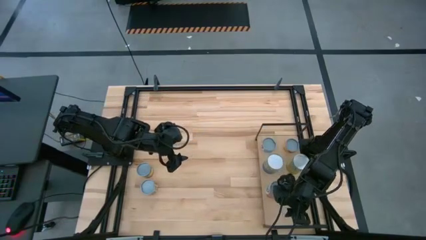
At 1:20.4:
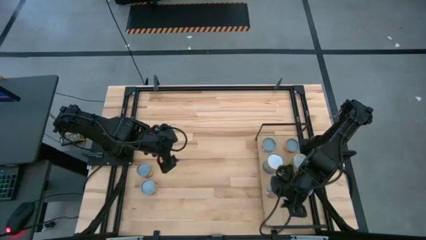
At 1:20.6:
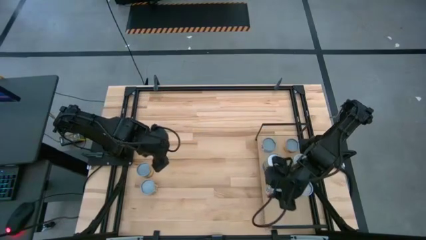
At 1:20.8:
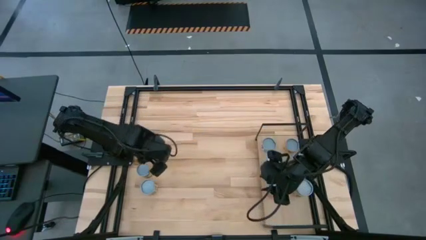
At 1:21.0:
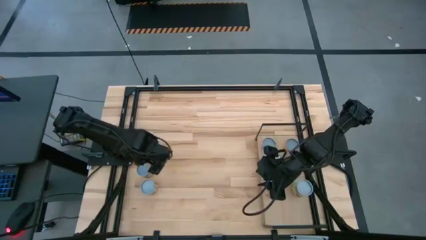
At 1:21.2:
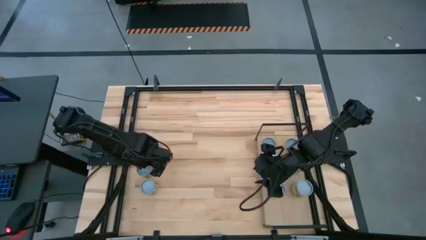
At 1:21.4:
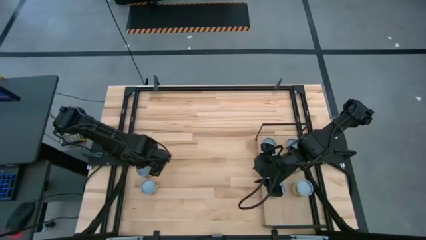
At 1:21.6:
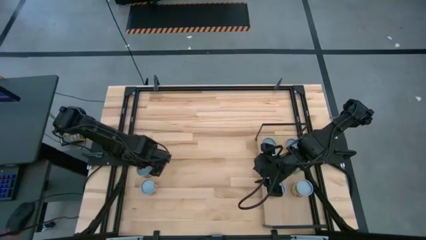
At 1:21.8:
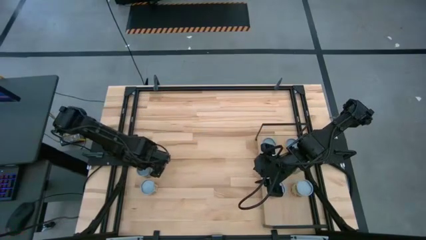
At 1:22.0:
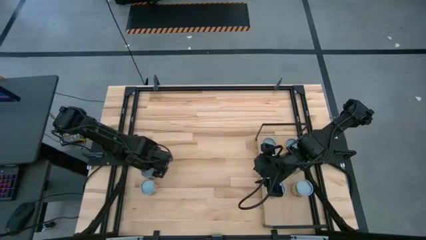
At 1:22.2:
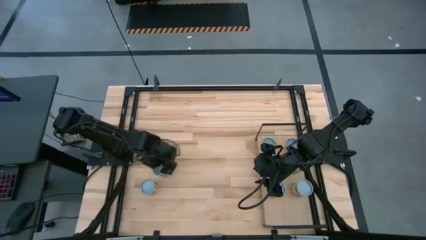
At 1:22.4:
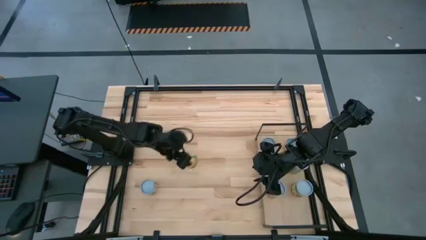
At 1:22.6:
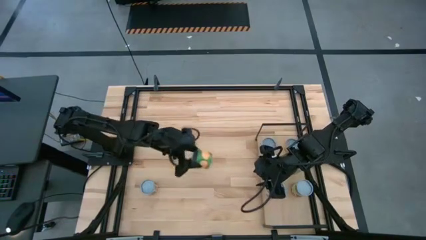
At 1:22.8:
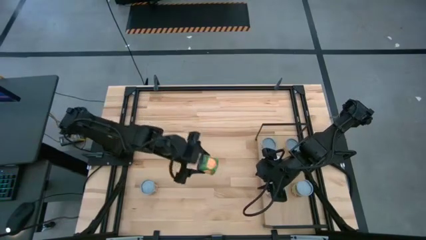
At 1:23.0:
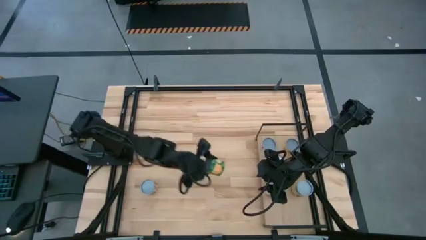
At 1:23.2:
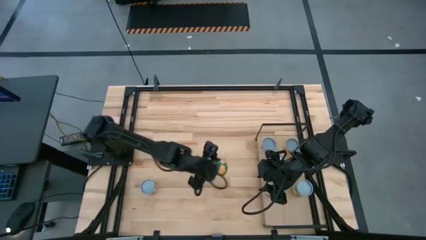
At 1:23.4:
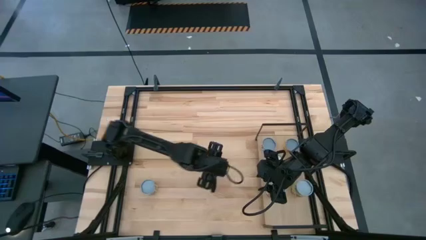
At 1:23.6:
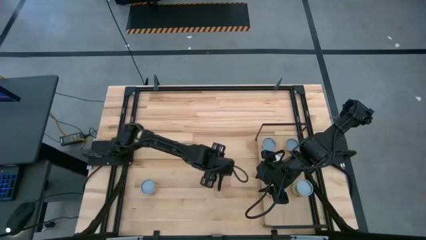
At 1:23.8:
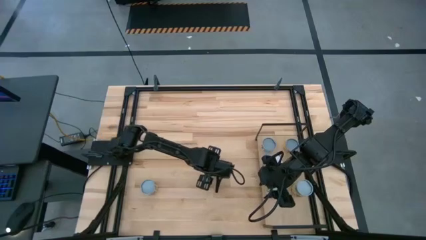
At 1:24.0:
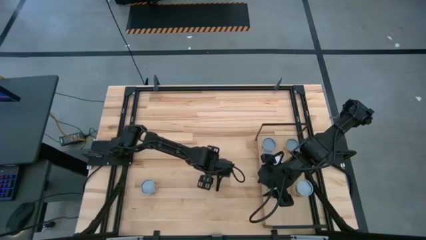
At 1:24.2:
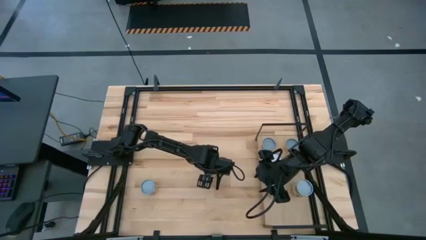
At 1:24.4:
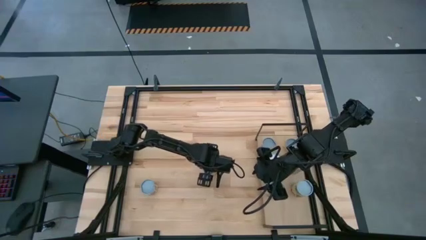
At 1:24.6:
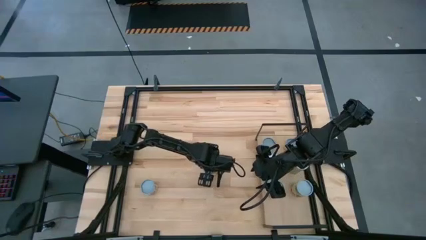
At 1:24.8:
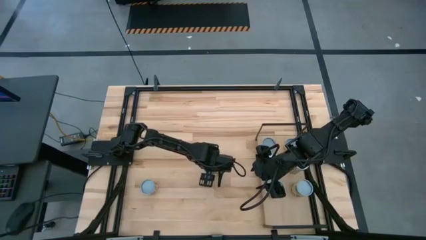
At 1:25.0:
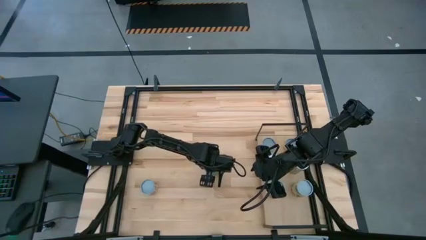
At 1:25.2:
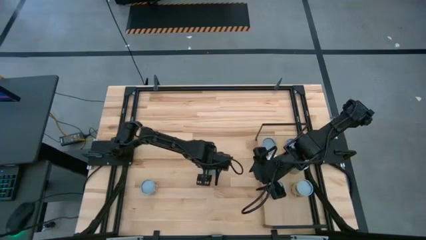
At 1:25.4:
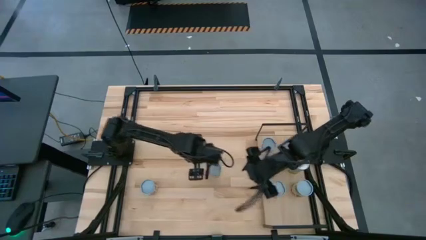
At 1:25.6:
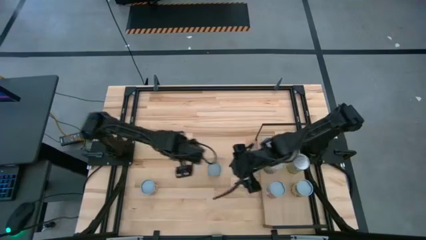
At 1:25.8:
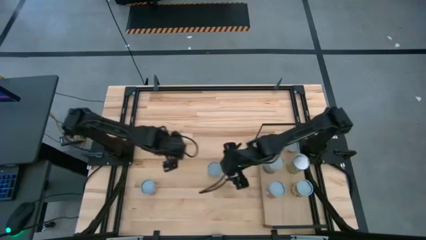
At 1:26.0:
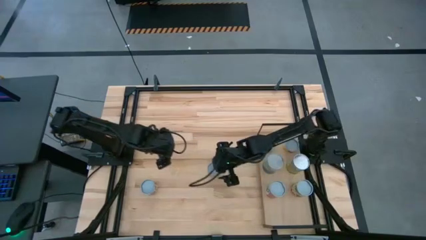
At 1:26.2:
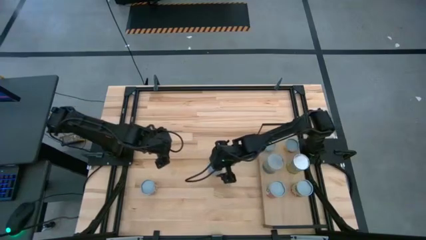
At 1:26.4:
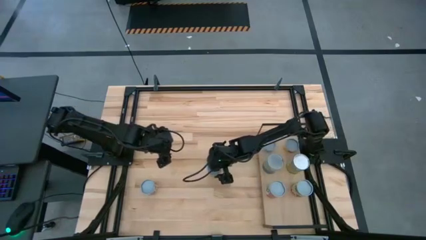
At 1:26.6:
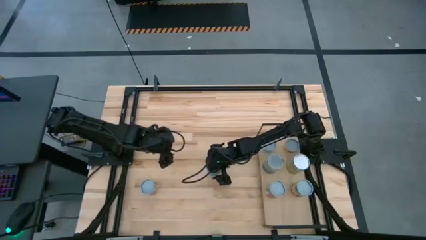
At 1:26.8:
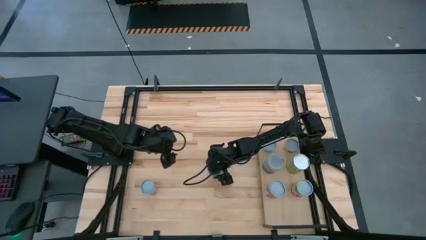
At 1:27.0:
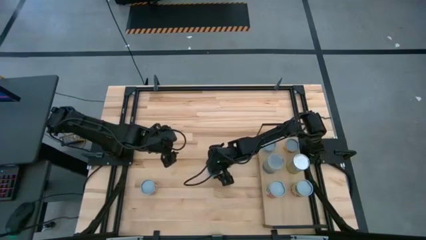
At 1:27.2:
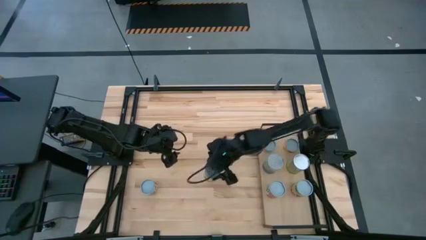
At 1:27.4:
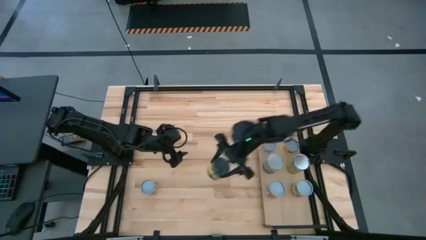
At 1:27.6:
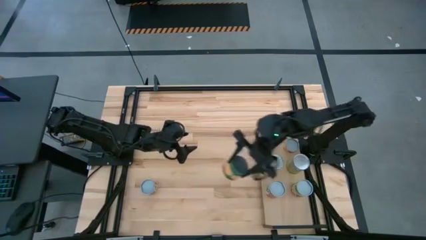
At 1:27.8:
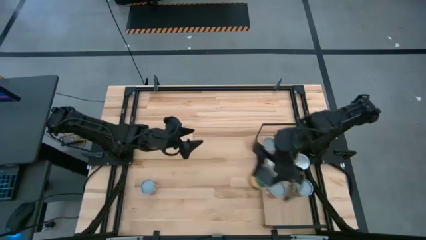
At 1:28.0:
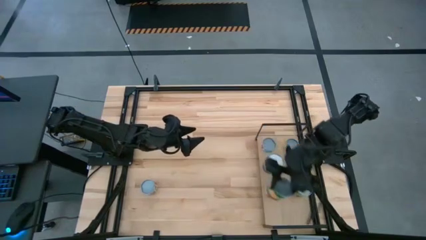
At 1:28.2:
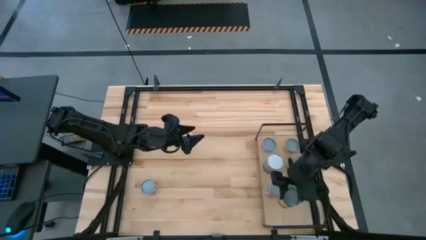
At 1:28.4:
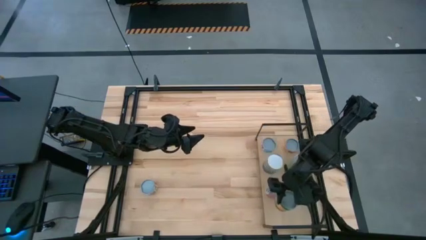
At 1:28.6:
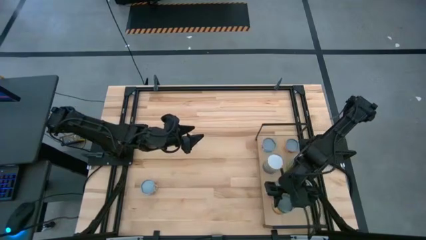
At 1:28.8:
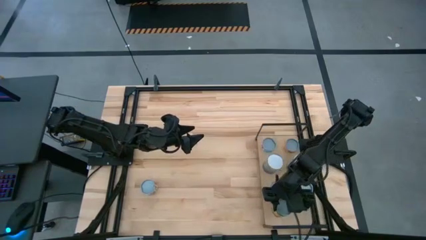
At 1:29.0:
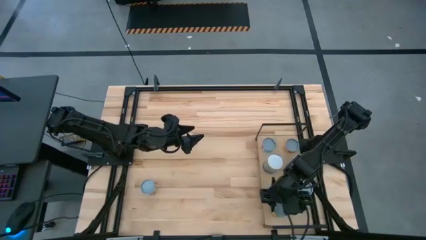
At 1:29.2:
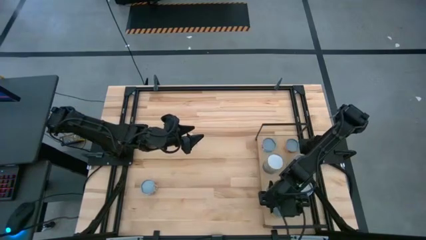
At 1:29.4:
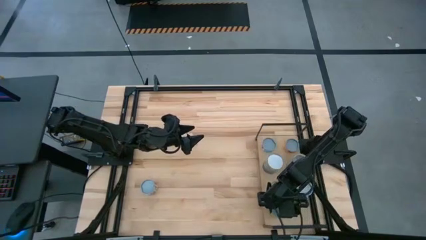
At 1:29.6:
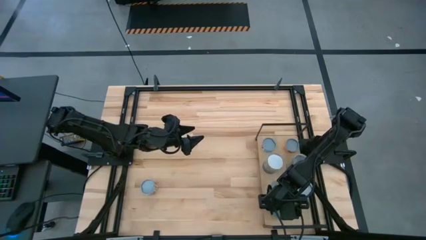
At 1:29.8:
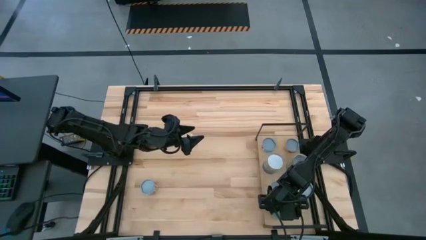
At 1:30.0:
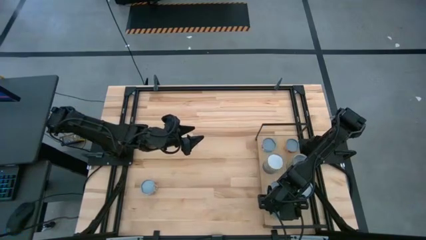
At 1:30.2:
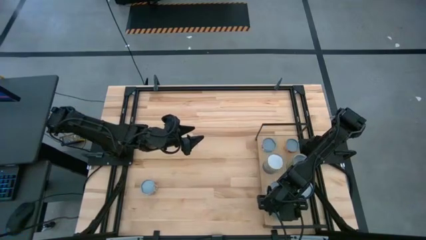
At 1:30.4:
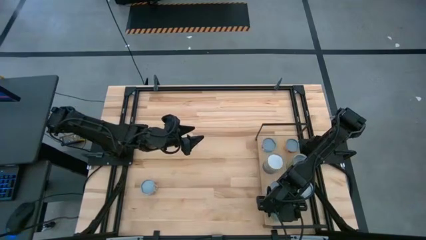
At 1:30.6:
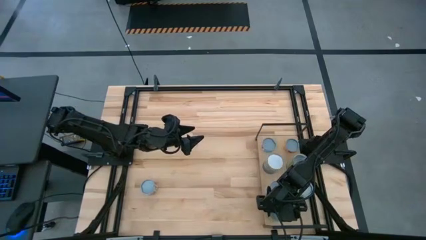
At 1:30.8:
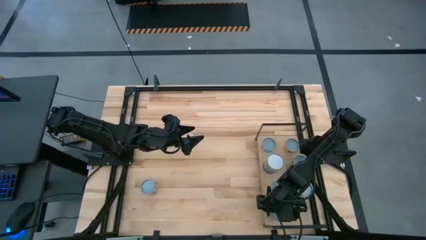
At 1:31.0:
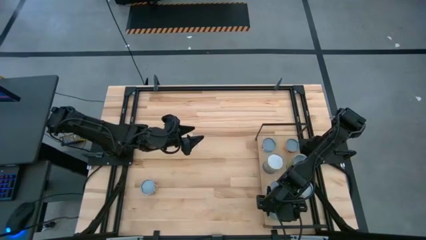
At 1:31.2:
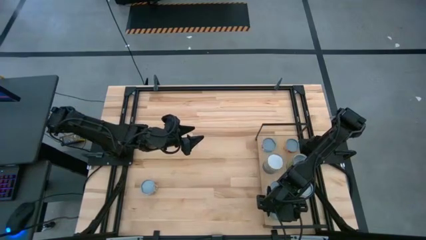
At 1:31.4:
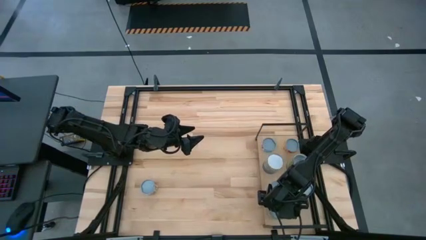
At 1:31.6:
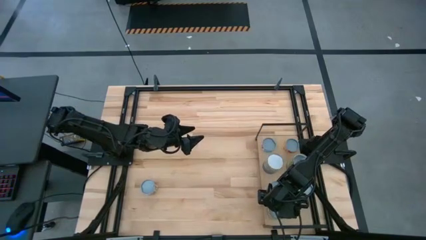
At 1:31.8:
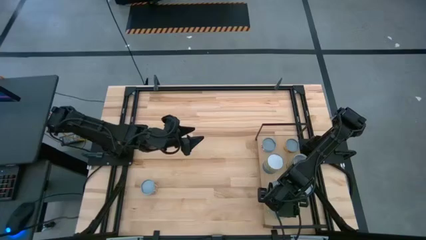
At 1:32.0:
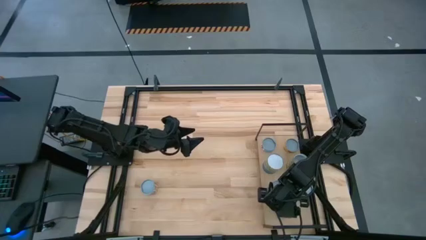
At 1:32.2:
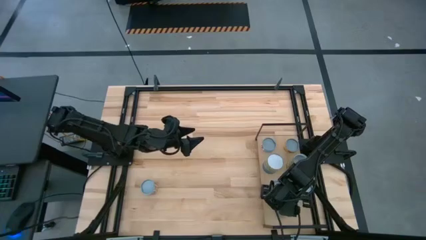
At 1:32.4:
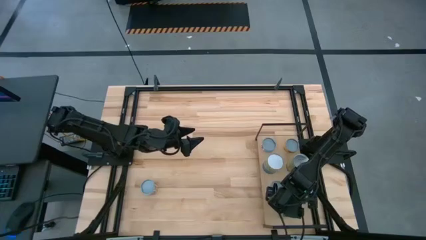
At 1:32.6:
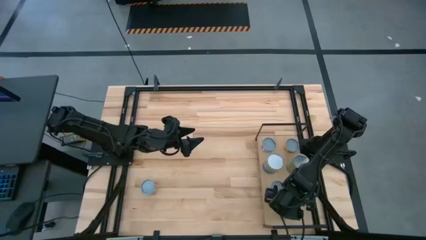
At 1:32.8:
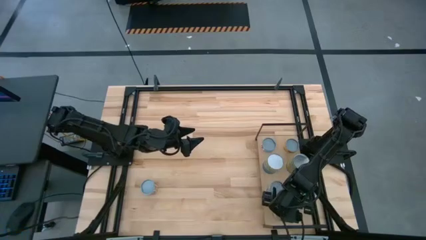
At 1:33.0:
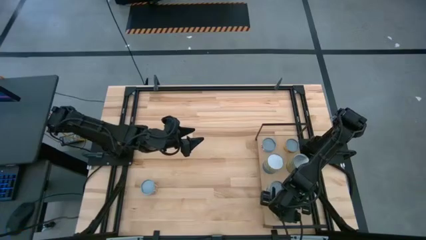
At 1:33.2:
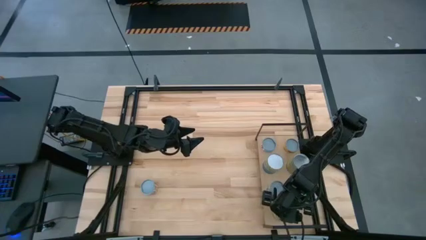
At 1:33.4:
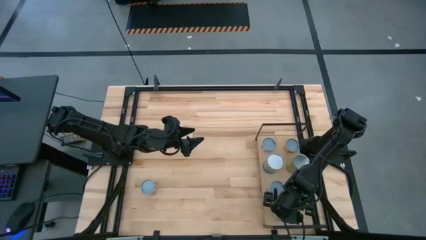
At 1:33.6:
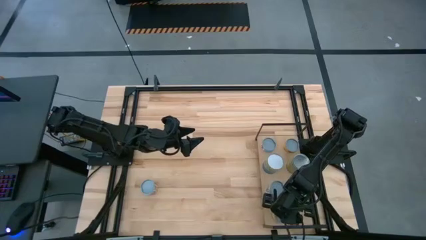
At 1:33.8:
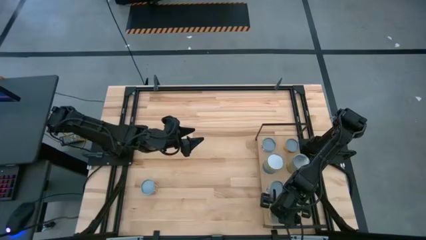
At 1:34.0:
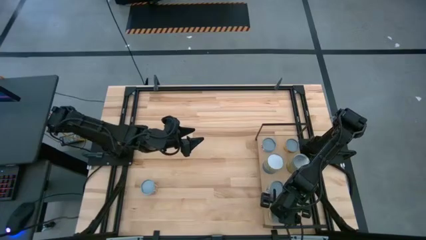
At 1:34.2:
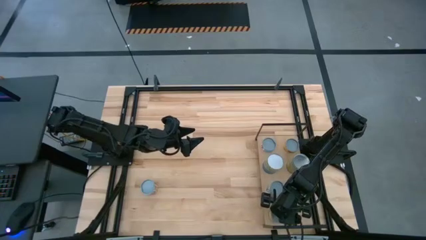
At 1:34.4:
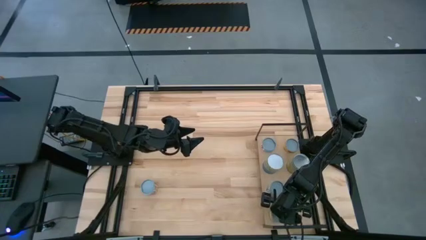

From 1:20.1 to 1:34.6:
Task: Pick and place cans onto a shelf
Put the canned peaches on the shelf

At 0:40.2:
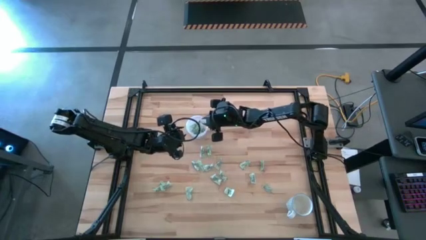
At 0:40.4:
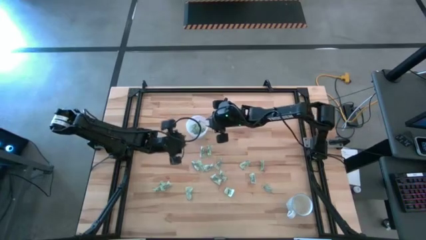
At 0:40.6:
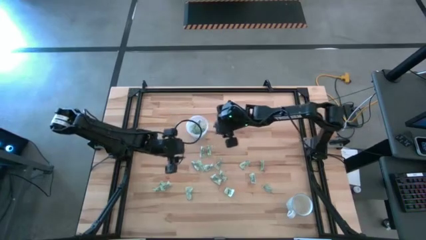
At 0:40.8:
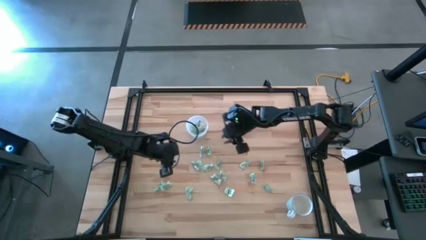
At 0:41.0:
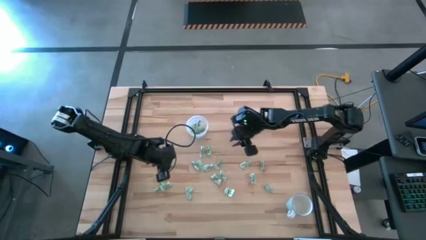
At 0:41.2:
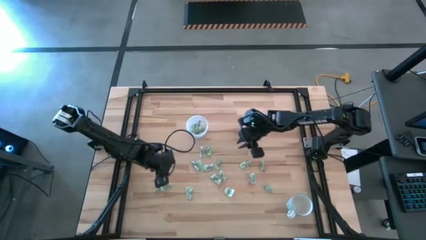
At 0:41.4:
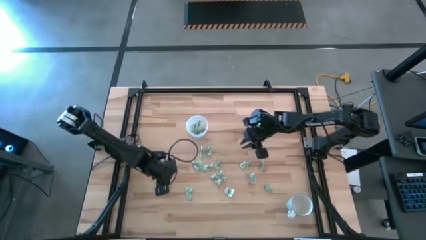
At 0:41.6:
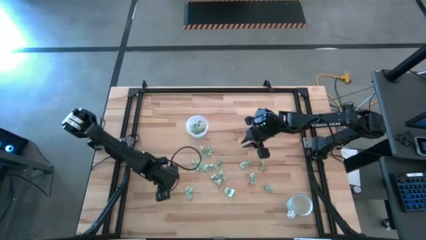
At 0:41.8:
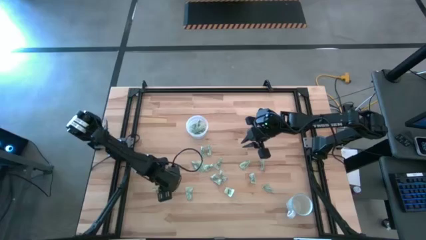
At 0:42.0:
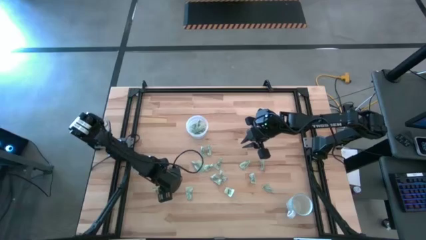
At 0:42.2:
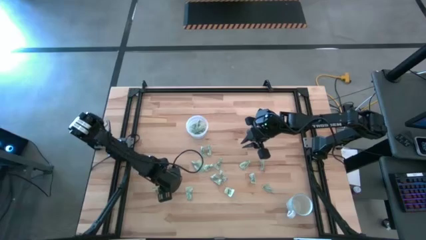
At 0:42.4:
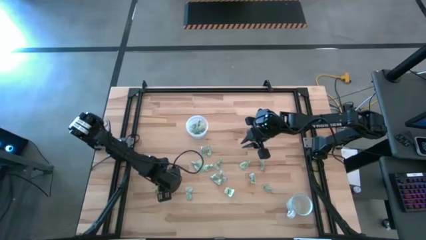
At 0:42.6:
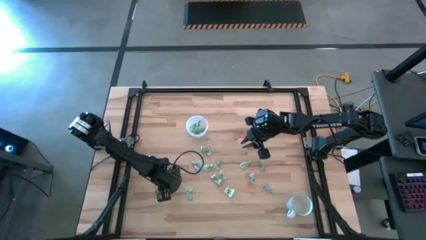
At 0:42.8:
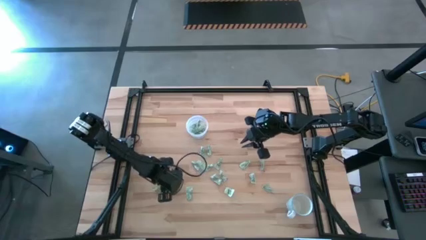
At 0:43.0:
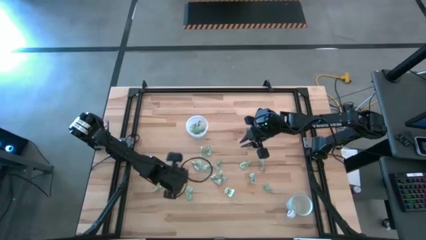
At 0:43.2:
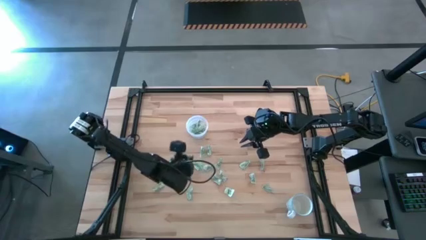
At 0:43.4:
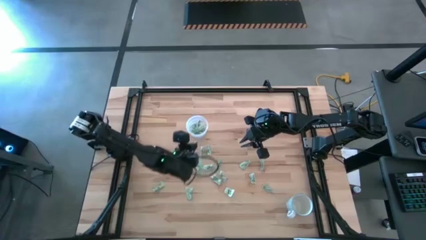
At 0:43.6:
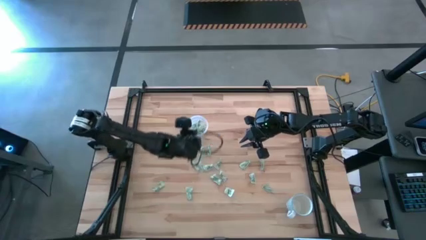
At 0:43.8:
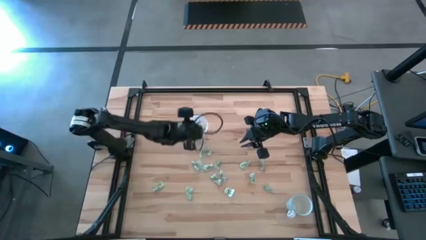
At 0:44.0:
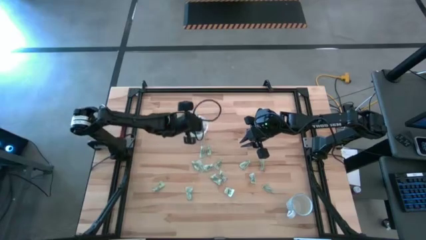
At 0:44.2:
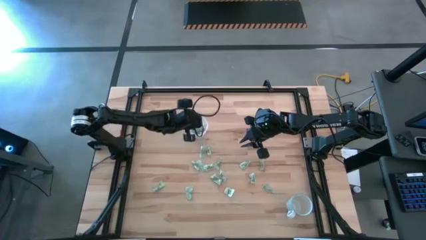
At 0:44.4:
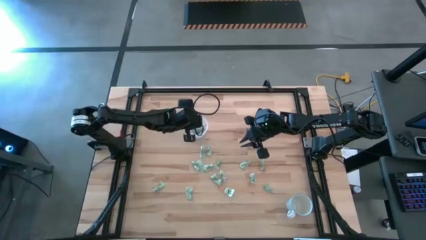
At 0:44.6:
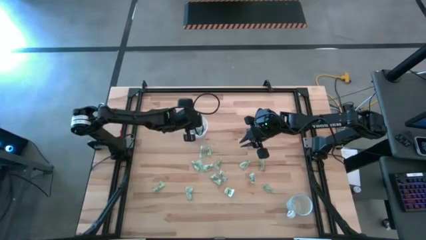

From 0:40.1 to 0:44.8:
Task: Pick and place Stevia / Truvia into bins
Put the stevia packet into the transparent container
